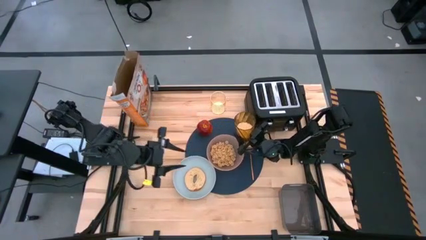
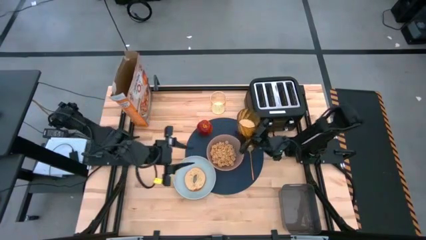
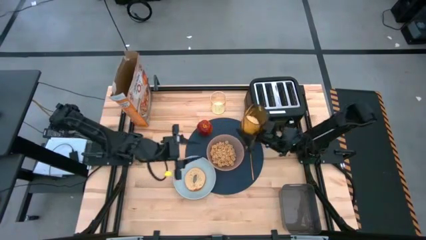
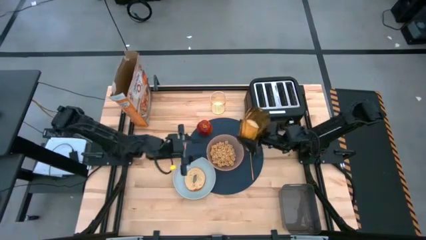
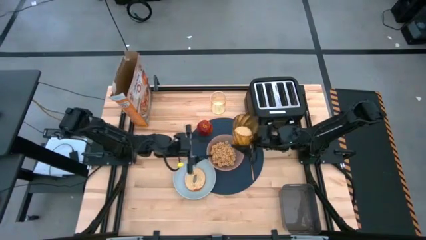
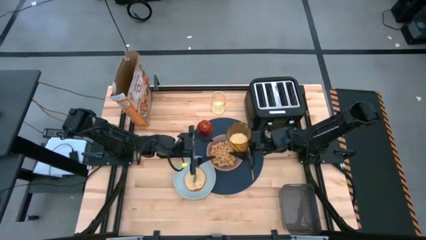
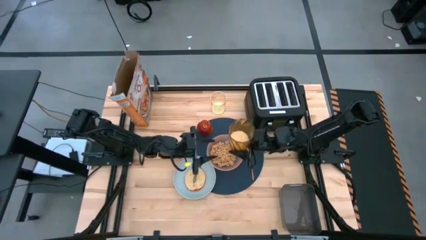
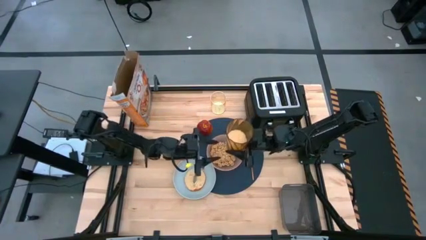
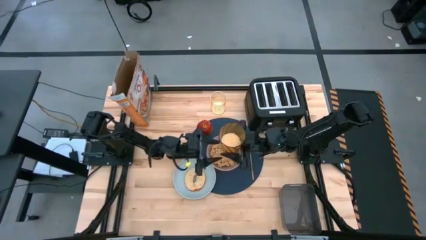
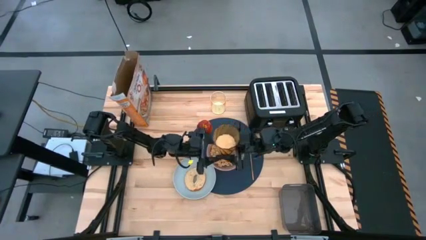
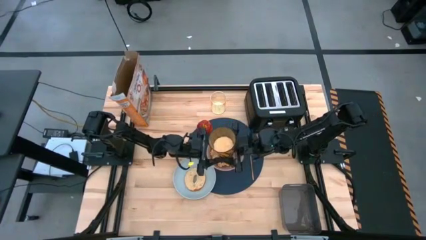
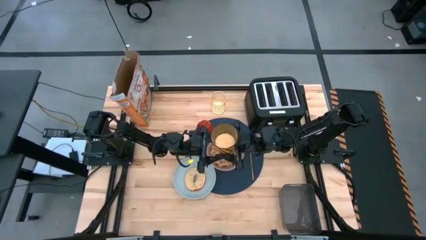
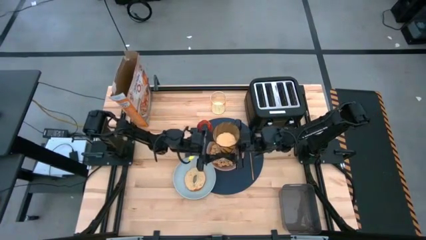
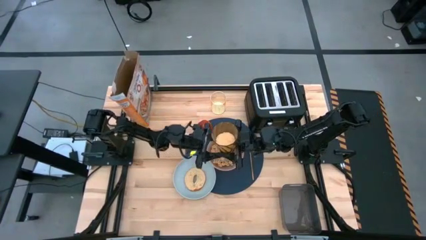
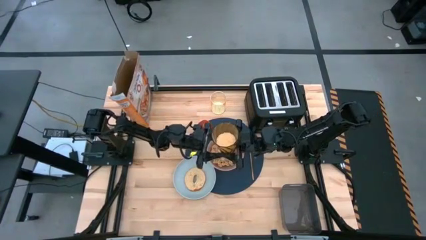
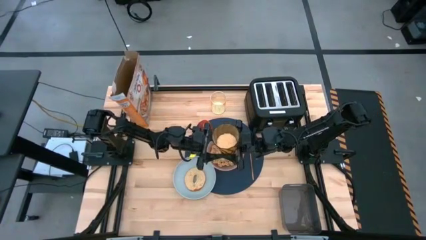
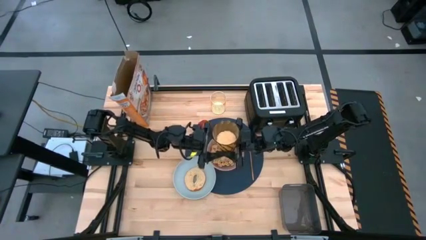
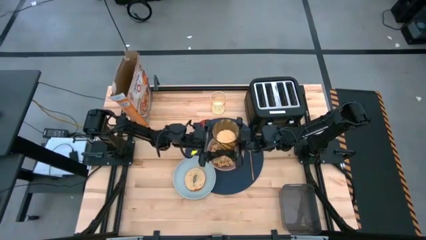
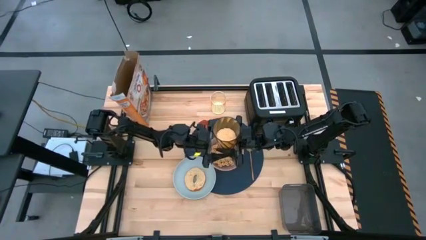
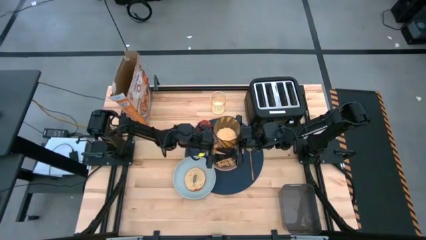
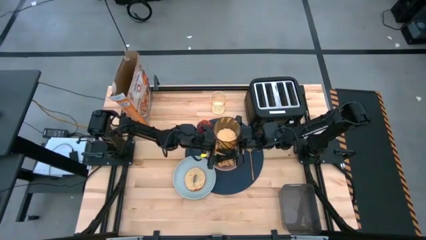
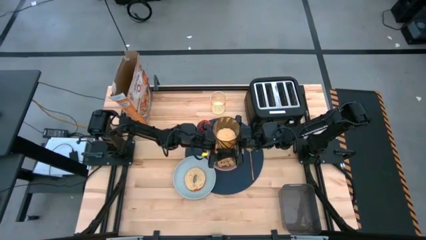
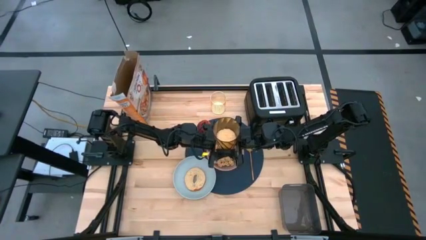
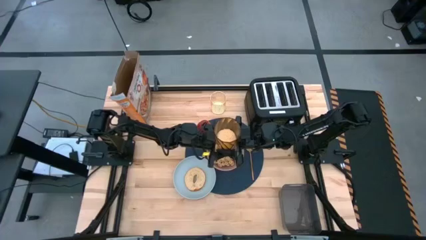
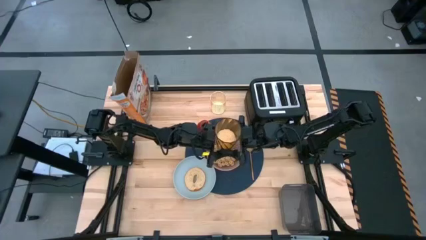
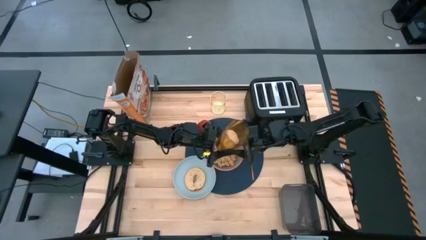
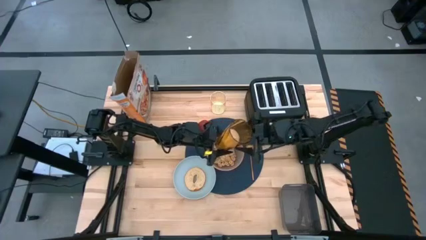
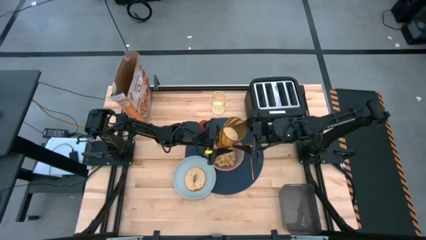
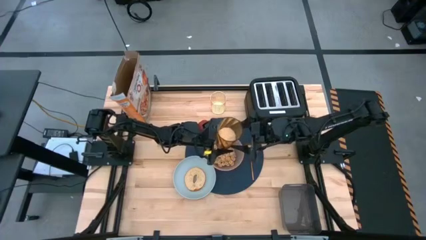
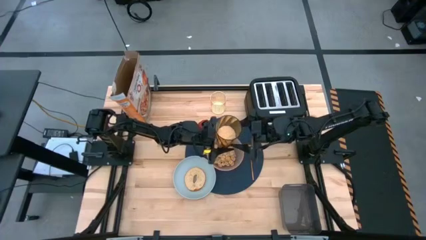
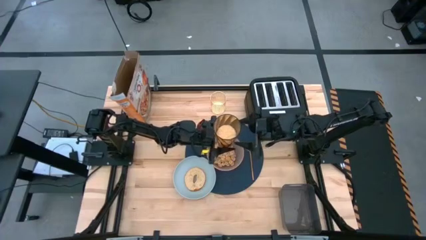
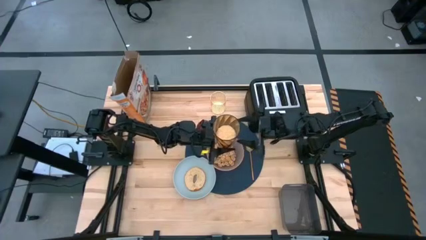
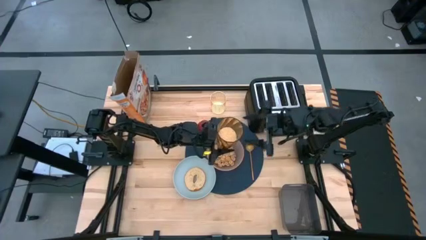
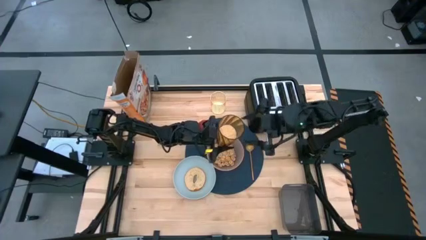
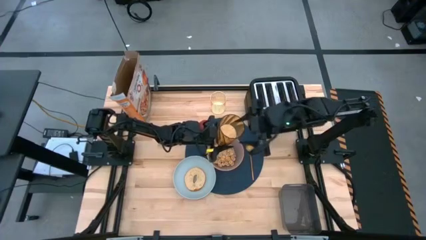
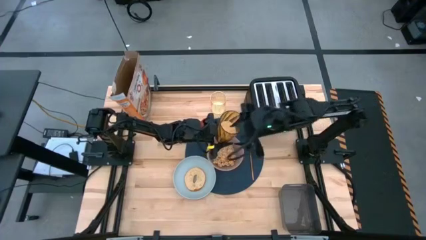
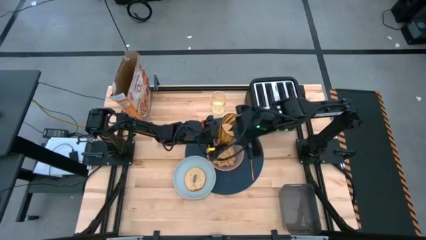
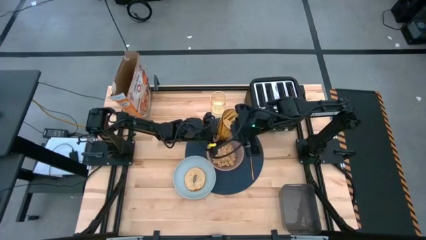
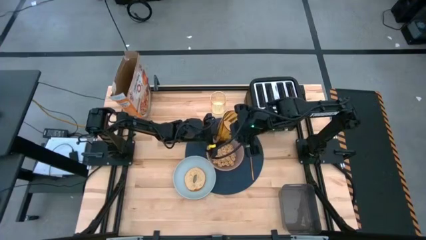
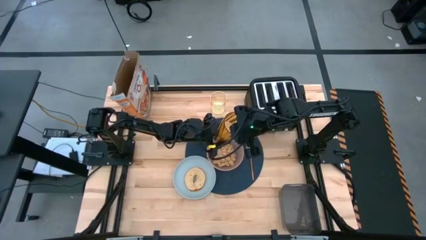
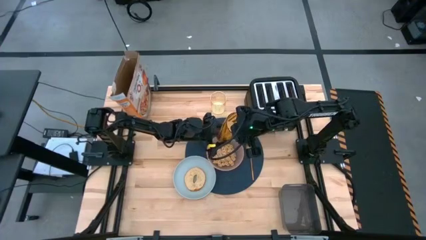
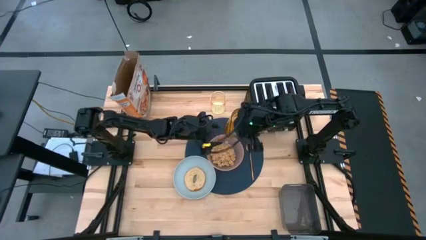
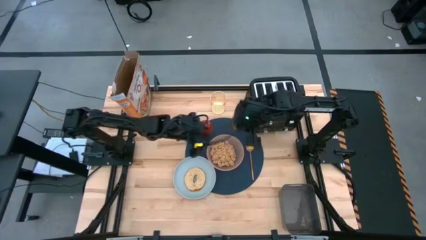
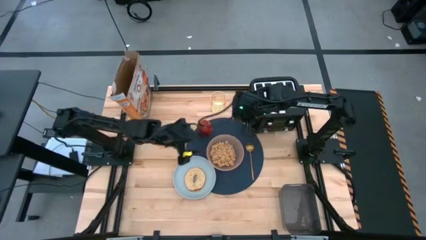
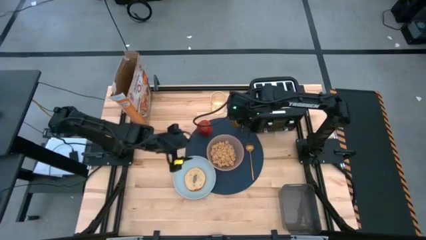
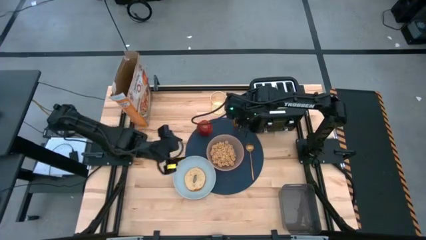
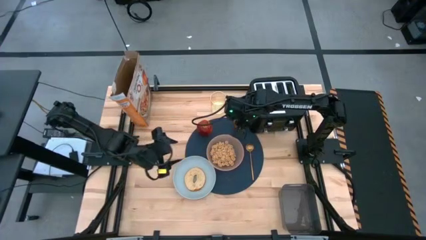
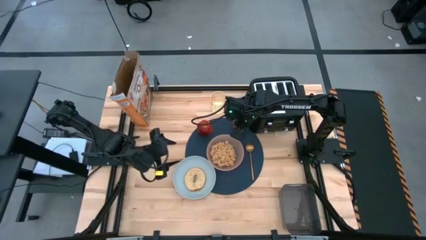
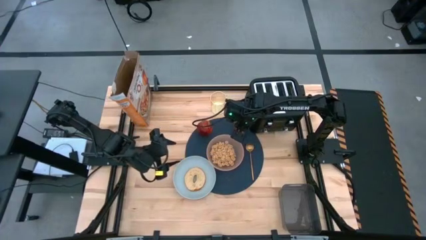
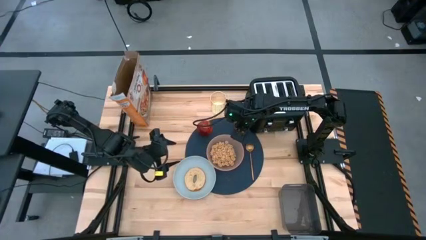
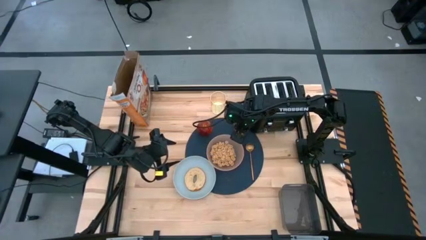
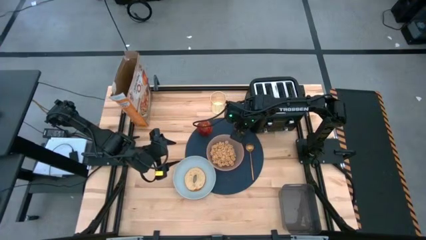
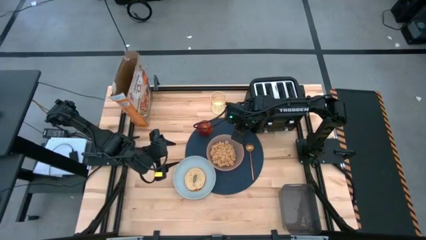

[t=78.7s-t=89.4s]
Task: Arrange a breakfast setting
Put the orange cup on the blue table mat to the top right of the pink bowl

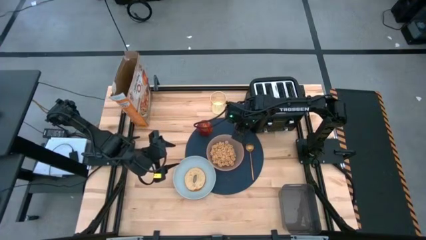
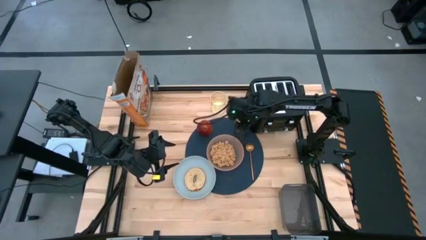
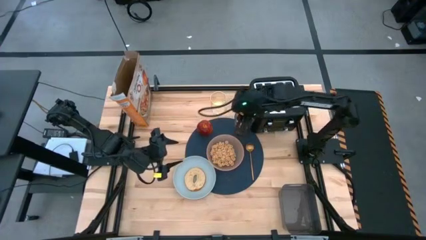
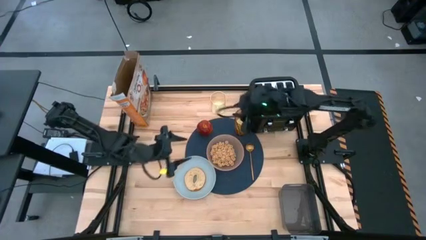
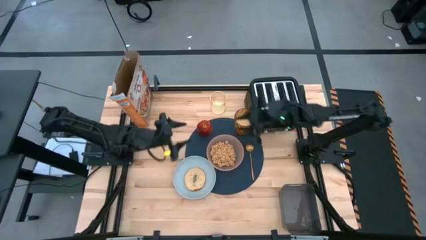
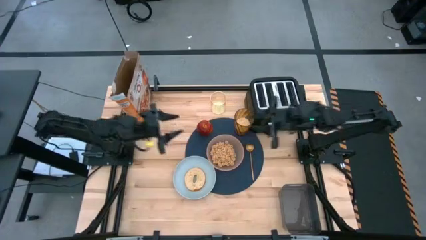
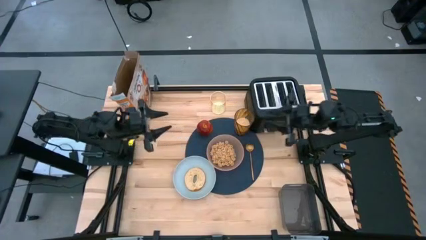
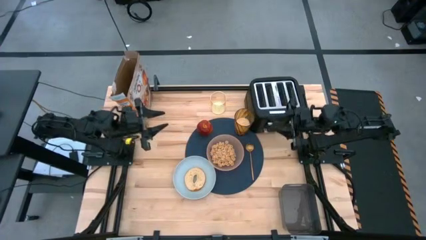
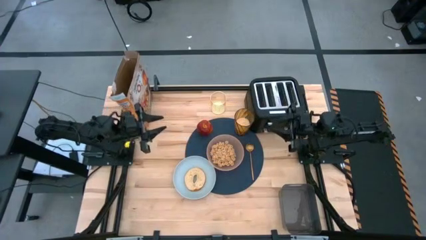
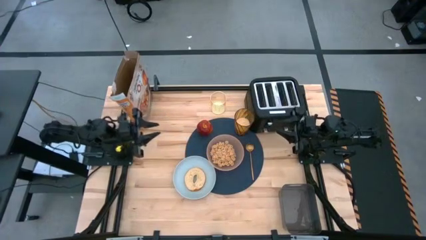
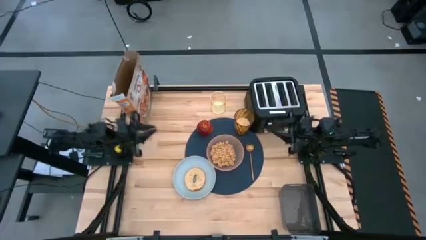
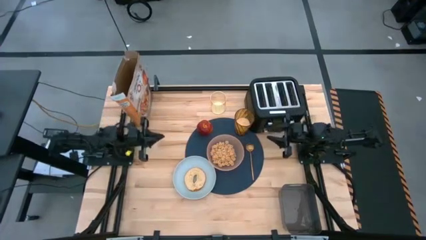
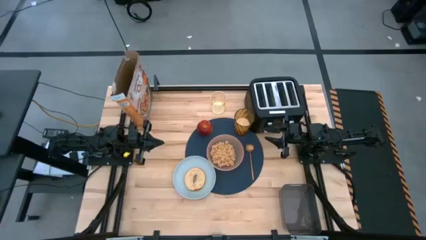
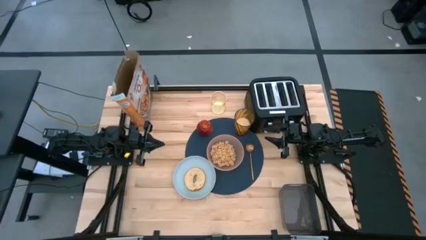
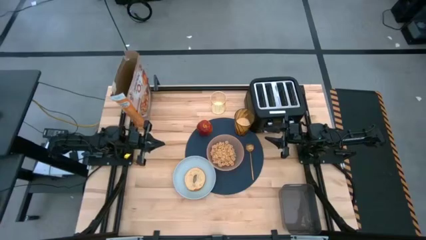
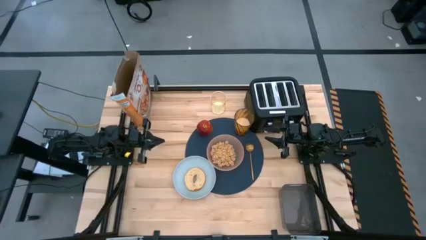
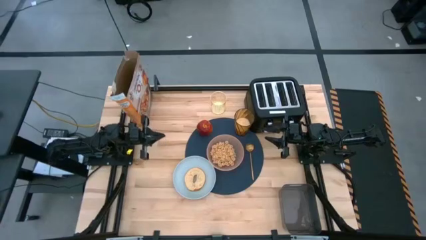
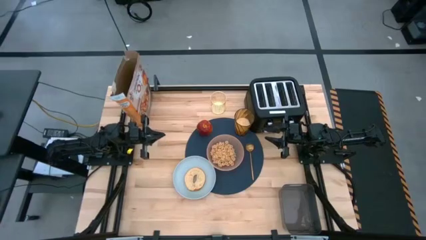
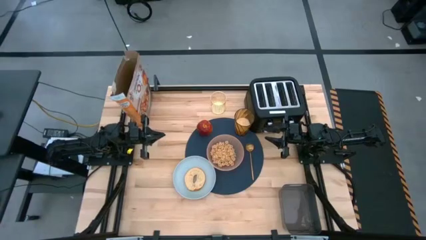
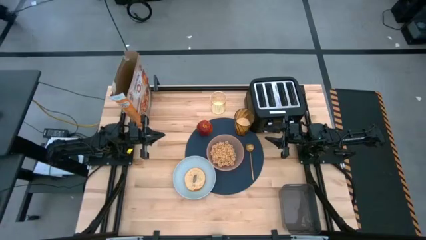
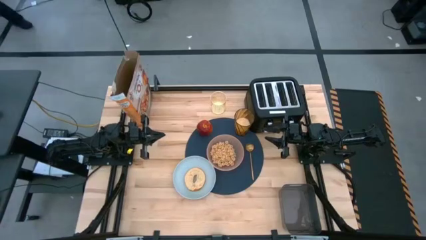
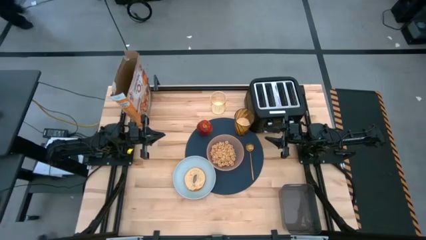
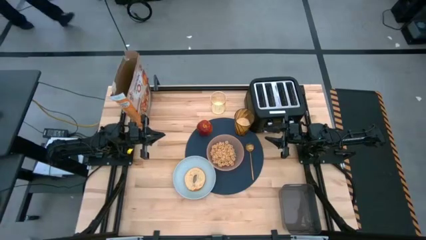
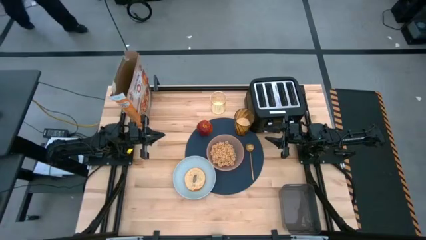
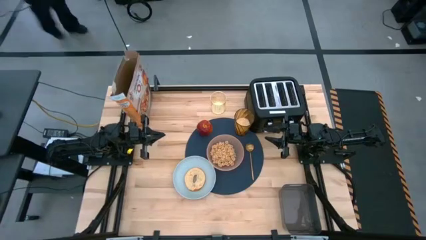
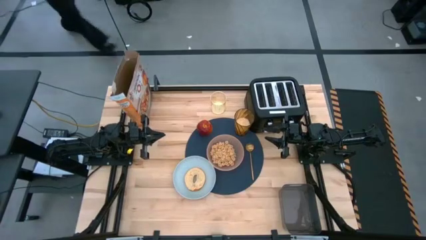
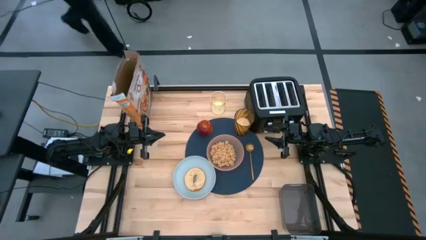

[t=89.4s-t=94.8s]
Return to Home position
